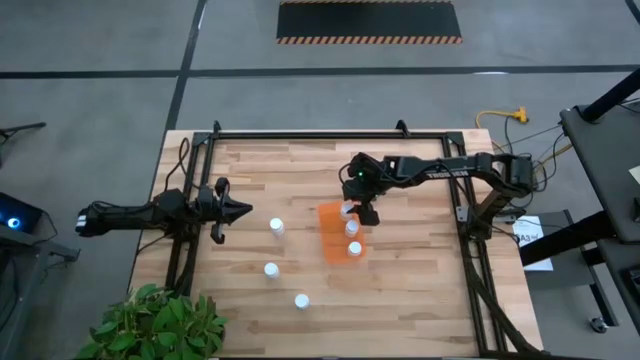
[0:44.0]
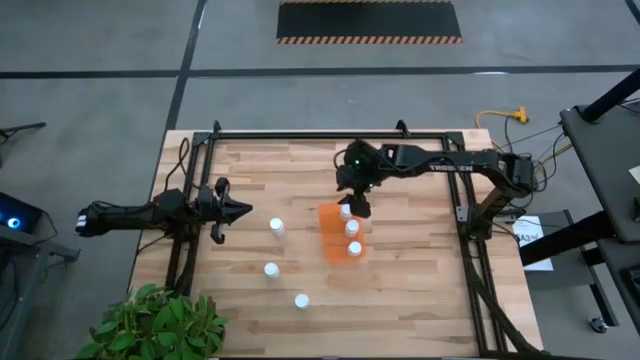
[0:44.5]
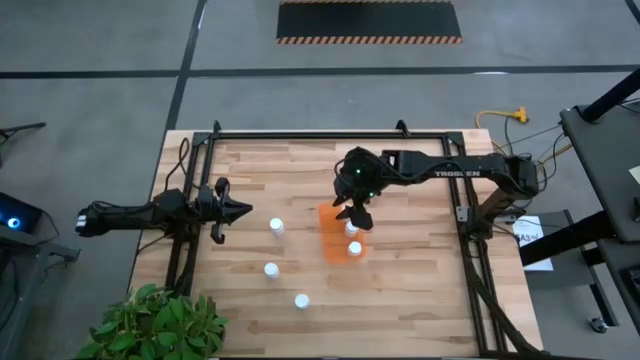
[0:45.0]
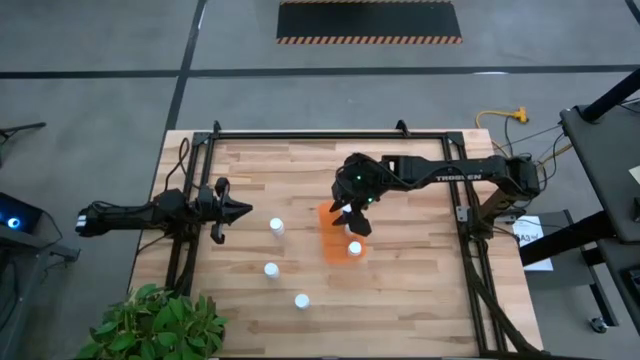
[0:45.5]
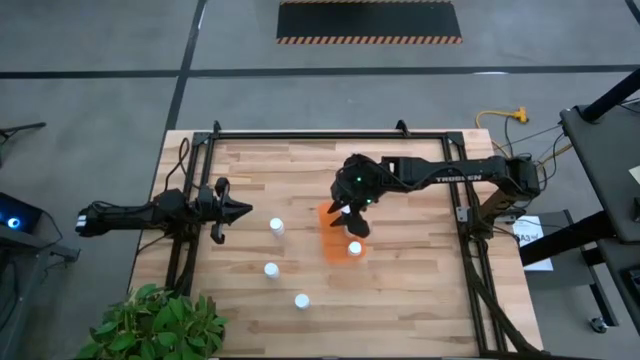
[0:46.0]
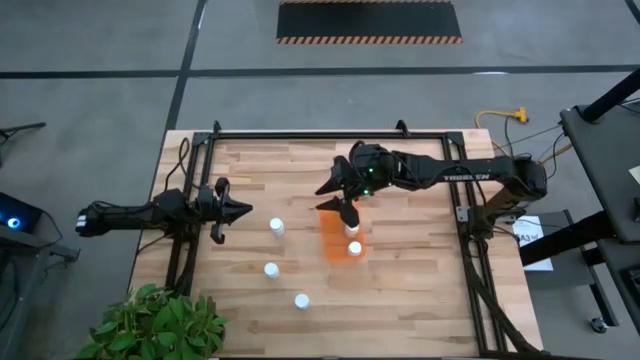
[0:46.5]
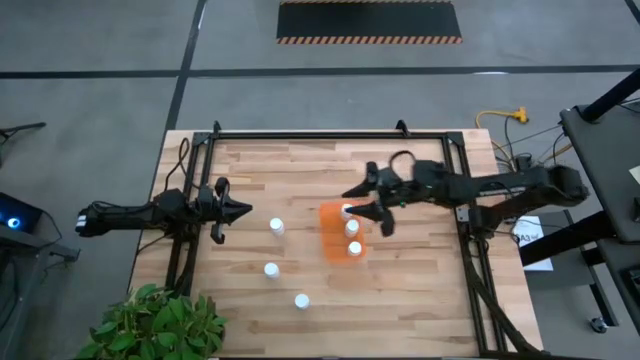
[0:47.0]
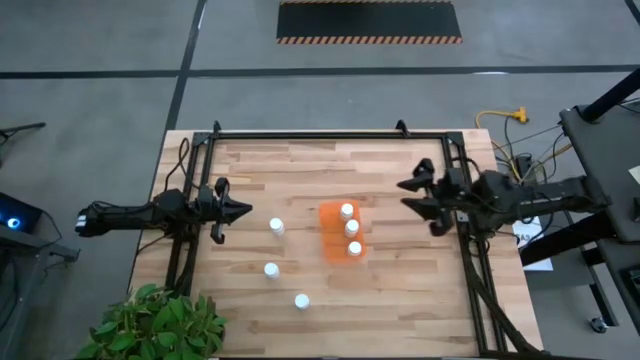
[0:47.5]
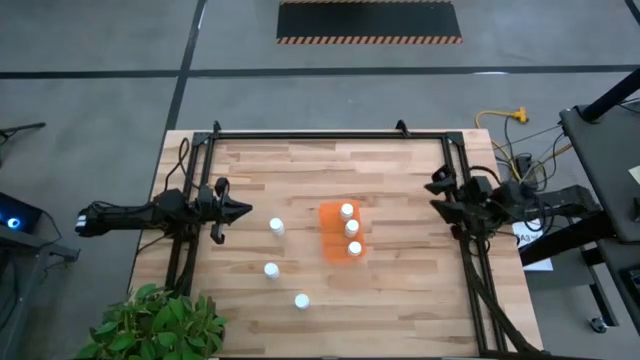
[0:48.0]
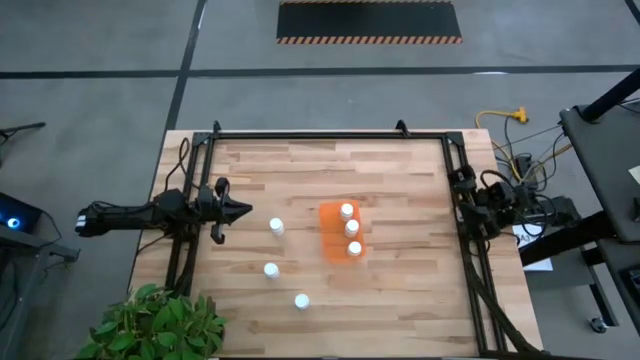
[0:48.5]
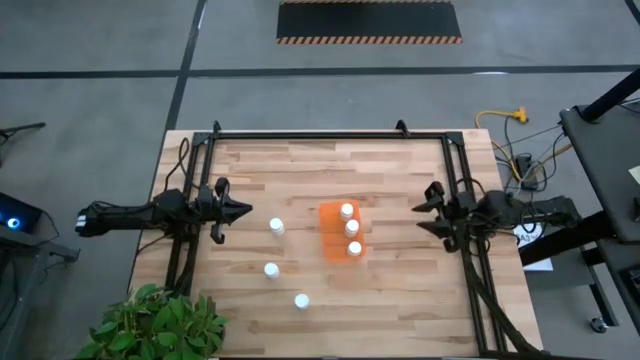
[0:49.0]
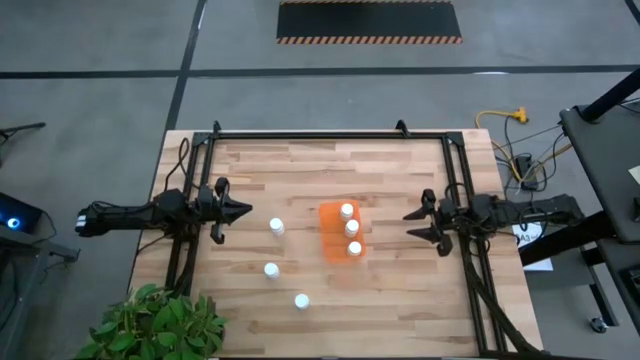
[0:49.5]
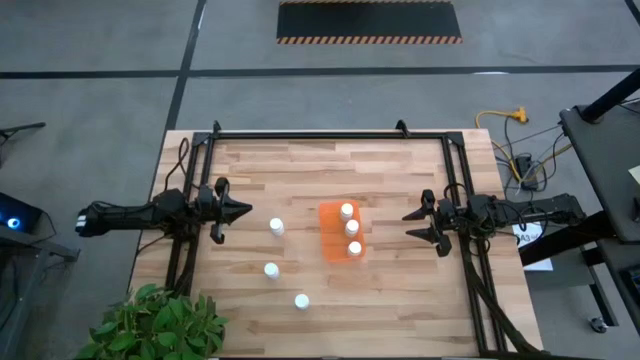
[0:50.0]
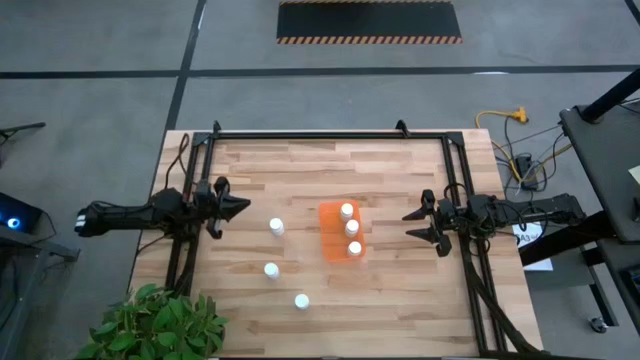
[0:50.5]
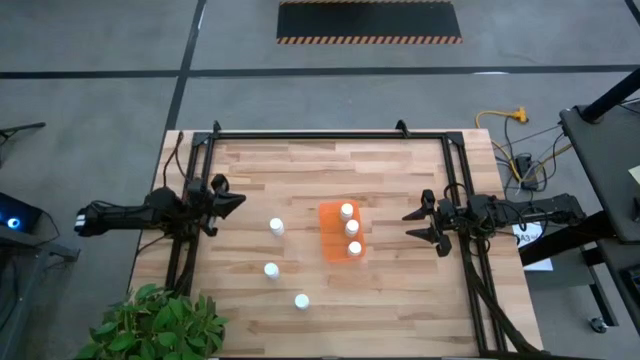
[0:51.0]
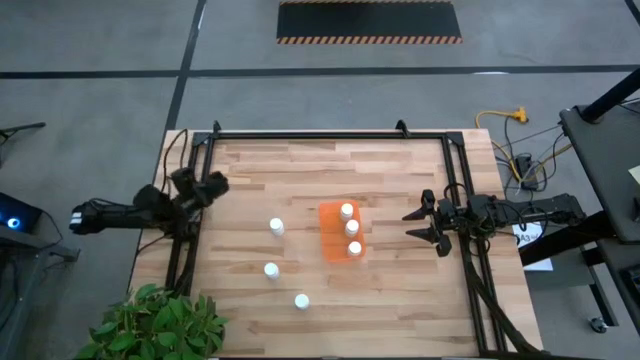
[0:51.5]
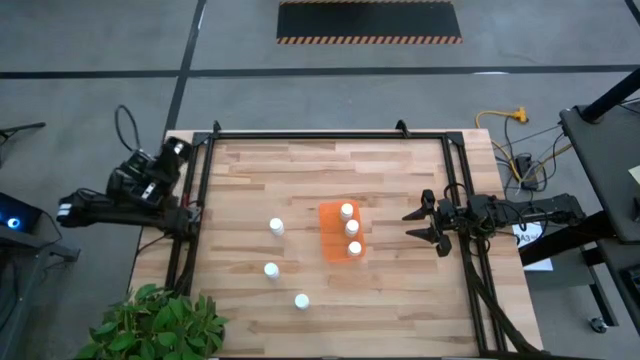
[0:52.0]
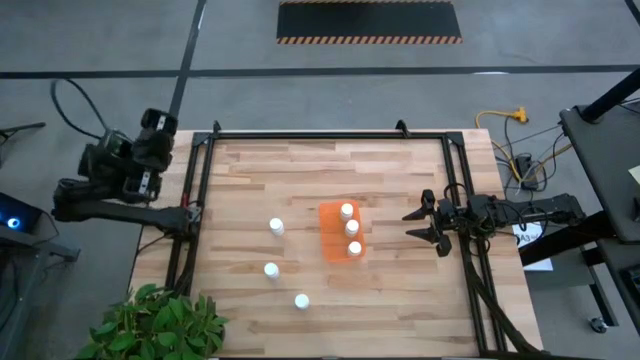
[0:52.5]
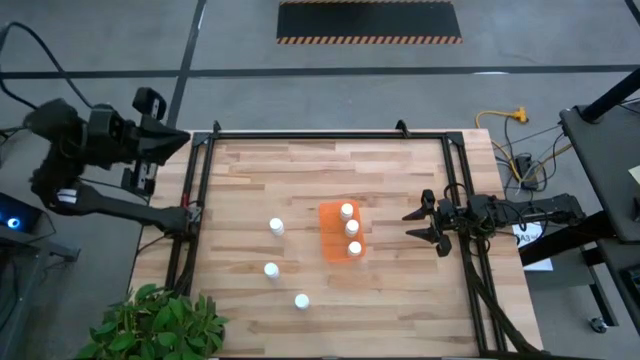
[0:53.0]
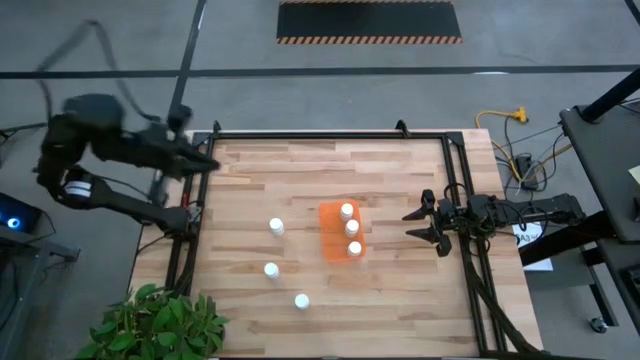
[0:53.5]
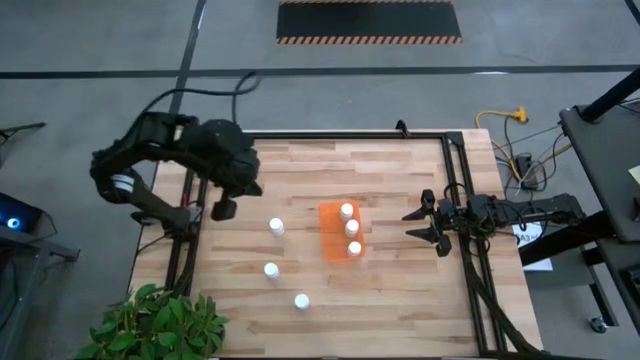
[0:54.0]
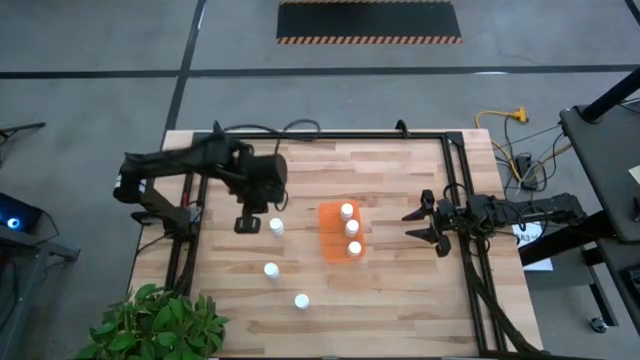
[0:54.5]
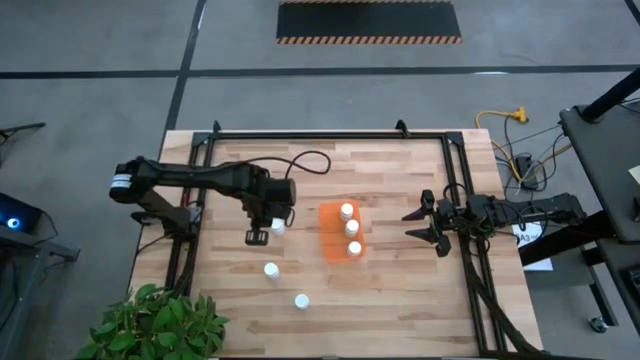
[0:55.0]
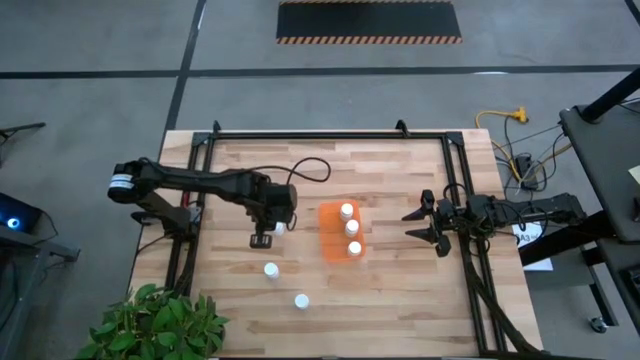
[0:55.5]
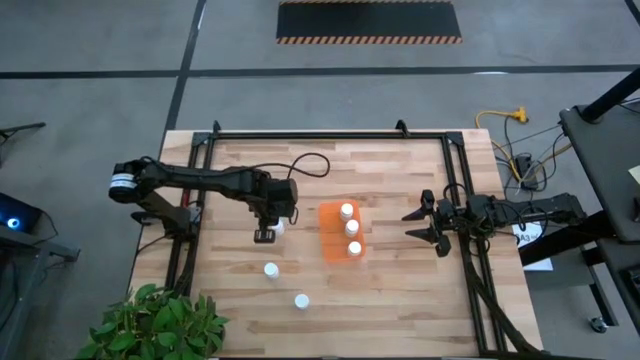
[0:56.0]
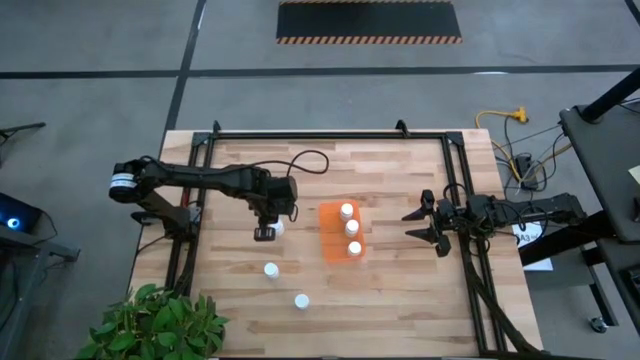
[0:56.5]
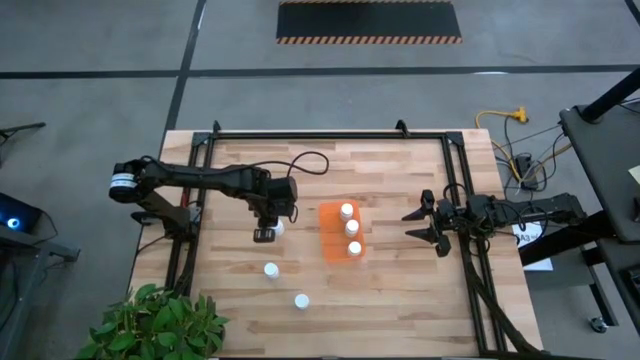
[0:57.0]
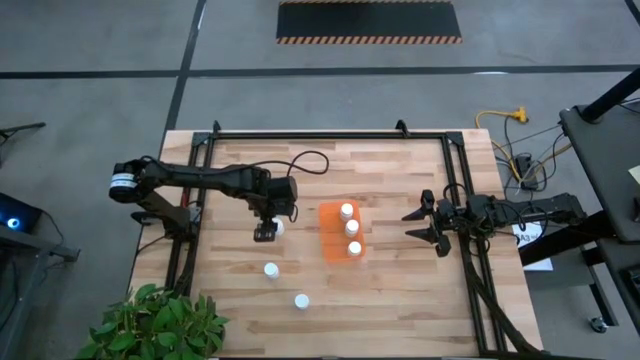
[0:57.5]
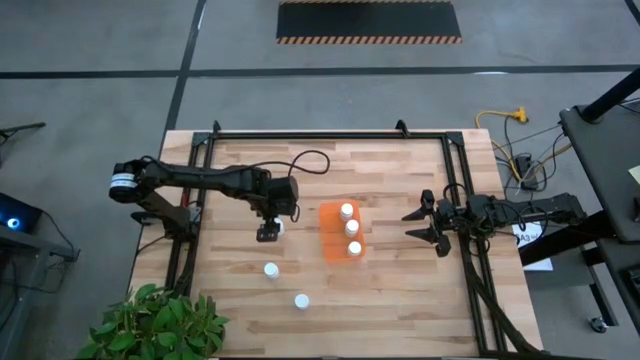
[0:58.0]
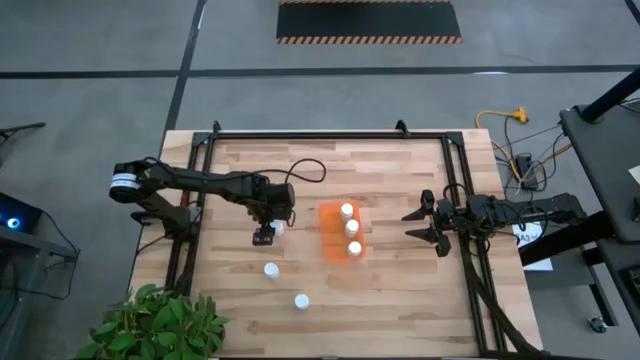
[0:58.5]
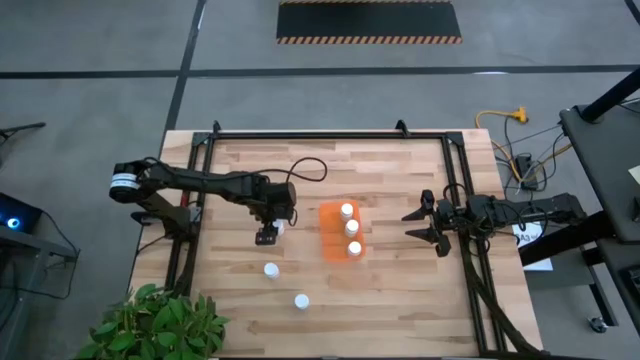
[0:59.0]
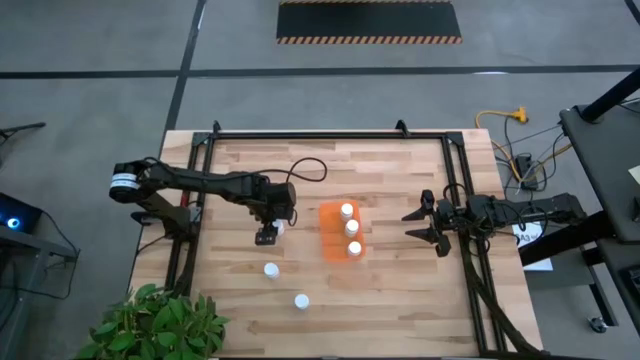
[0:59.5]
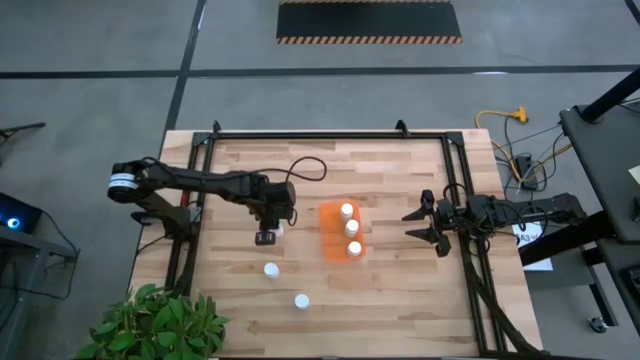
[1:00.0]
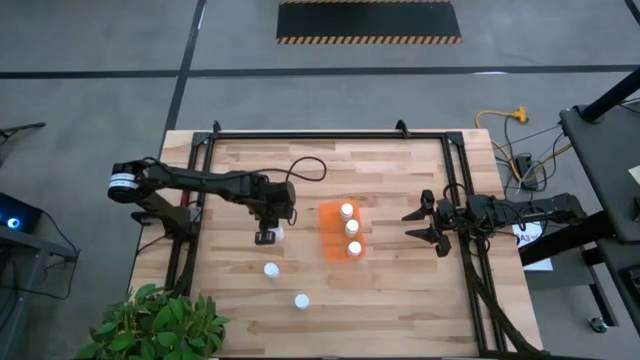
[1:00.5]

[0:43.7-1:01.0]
Task: Pick and place pill bottles into a basket
Put the top white pill bottle into the orange bin

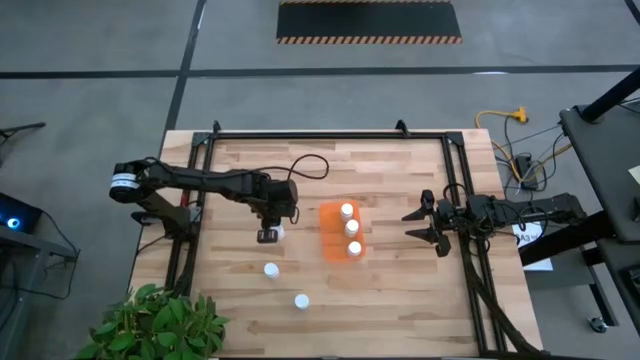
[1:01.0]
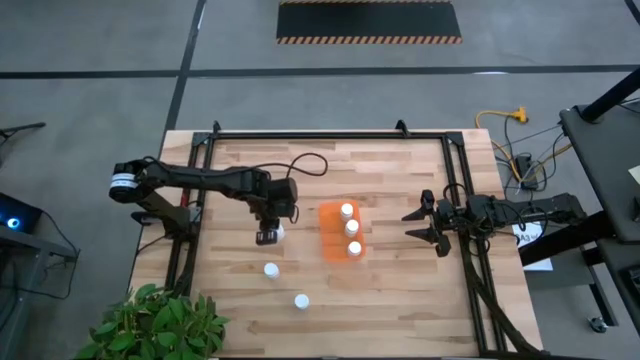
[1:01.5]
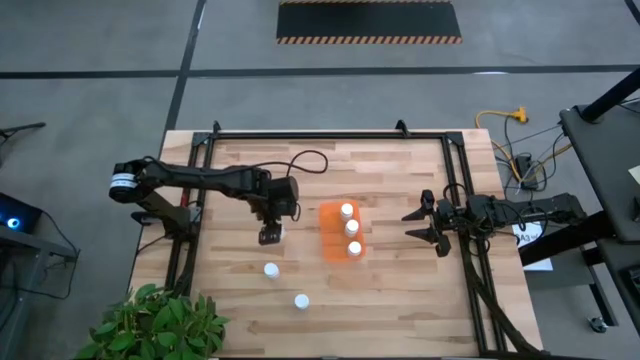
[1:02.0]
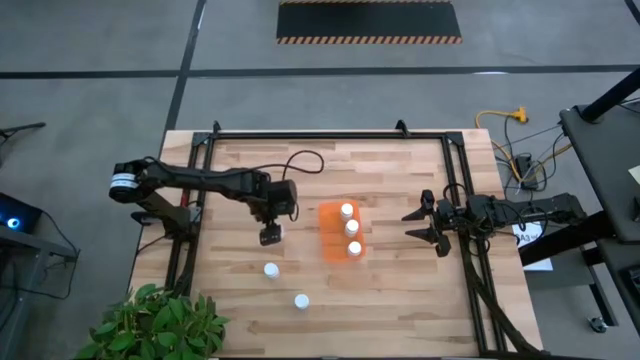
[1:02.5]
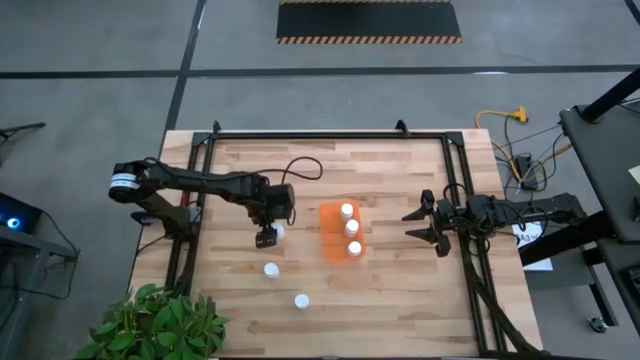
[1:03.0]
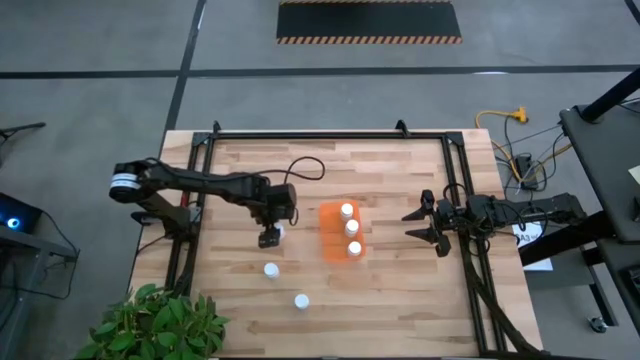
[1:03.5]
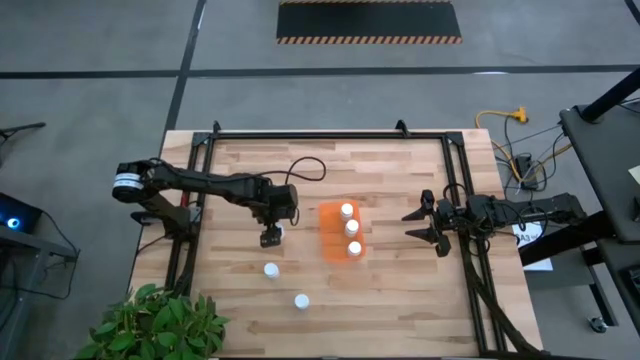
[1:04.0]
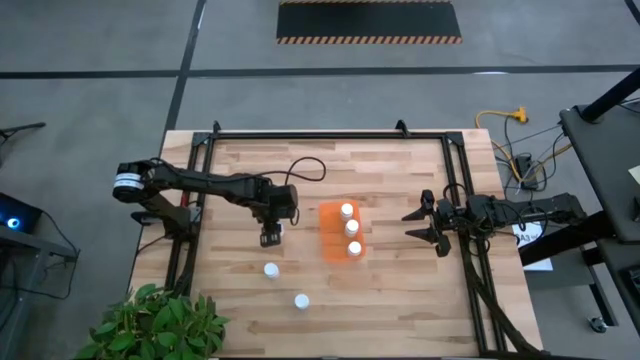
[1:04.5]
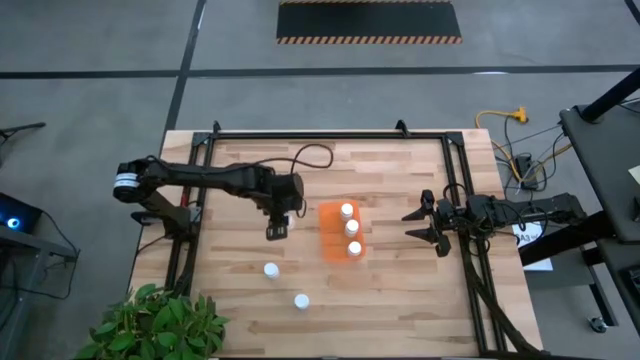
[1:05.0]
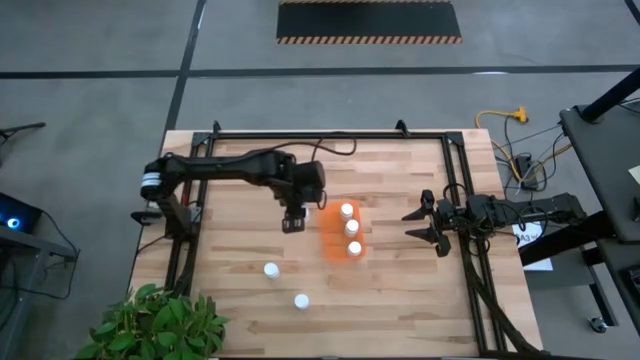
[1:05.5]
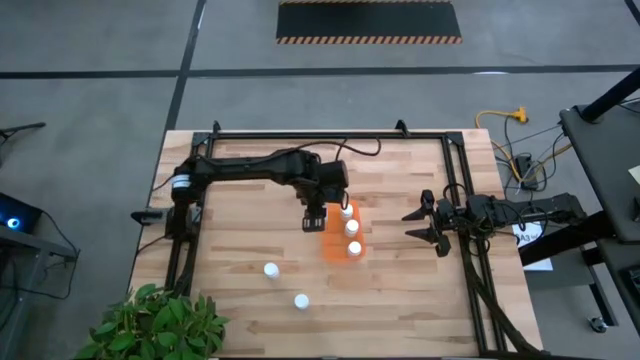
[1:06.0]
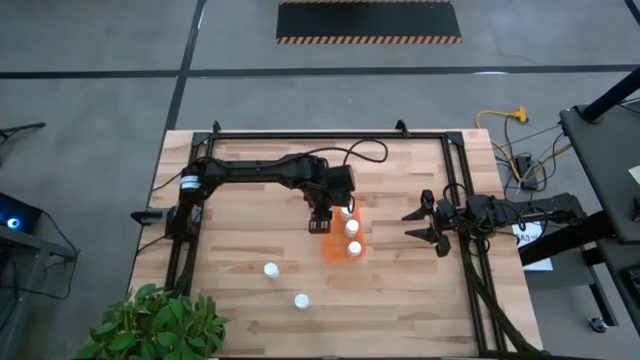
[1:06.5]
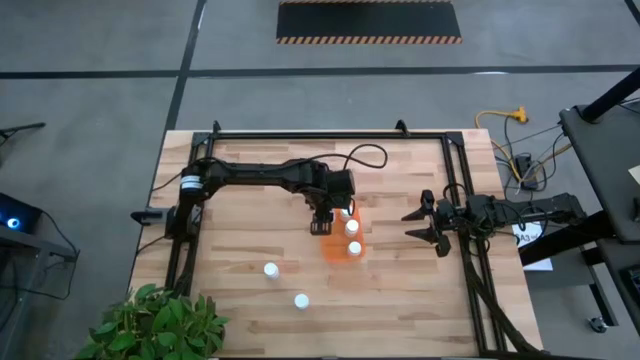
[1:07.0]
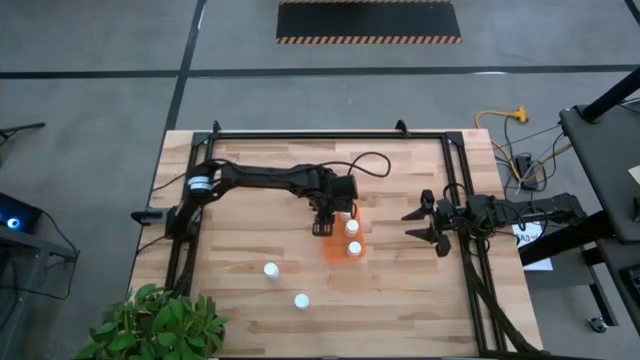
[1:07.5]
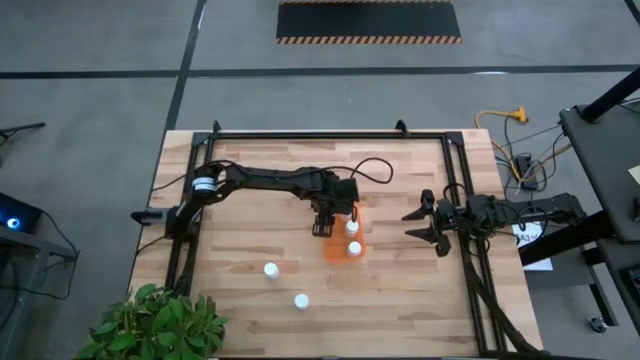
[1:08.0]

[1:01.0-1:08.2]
Put the top white pill bottle into the orange bin
